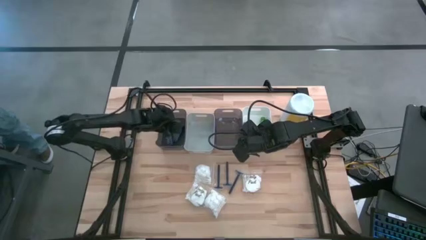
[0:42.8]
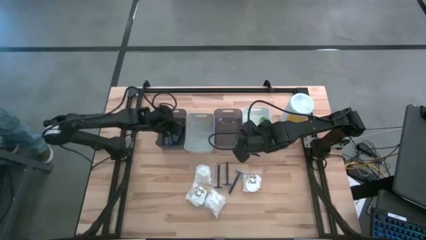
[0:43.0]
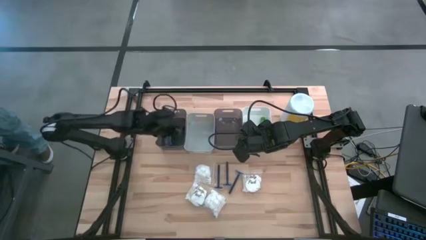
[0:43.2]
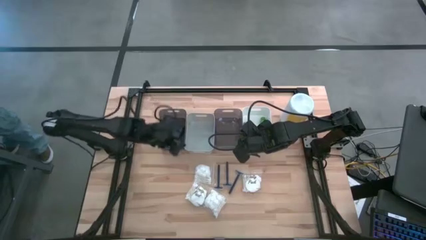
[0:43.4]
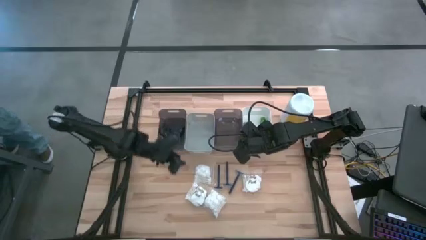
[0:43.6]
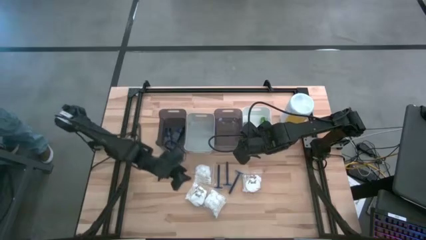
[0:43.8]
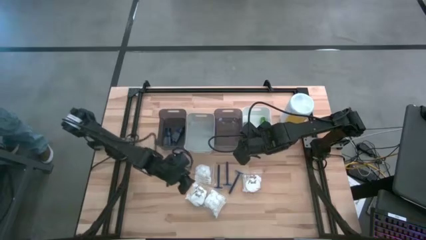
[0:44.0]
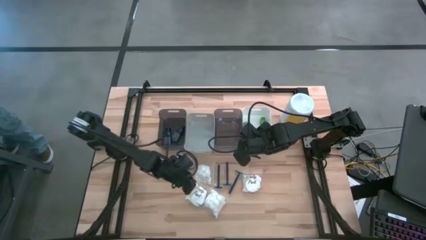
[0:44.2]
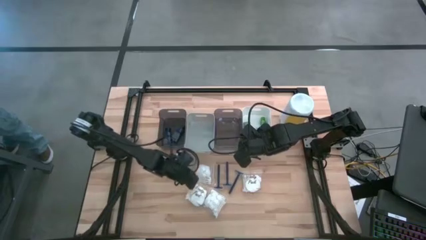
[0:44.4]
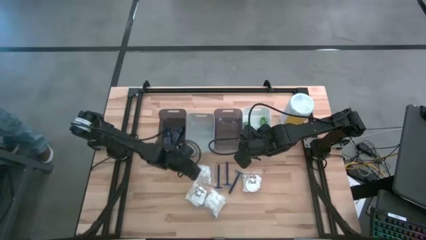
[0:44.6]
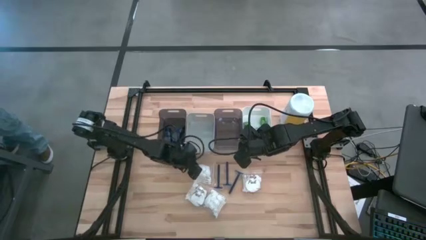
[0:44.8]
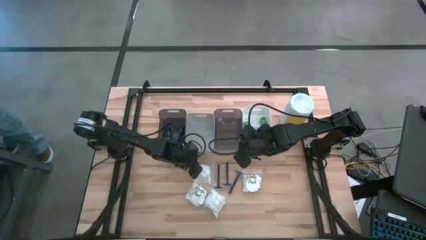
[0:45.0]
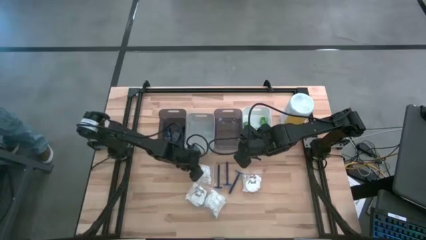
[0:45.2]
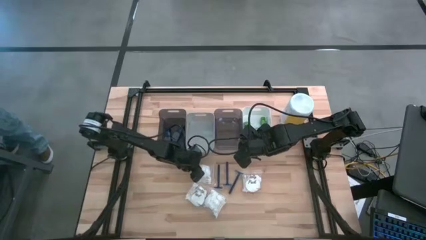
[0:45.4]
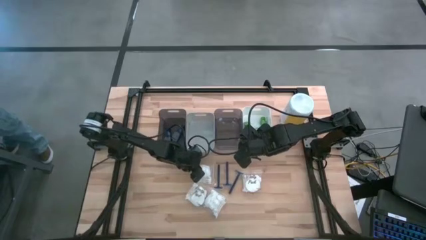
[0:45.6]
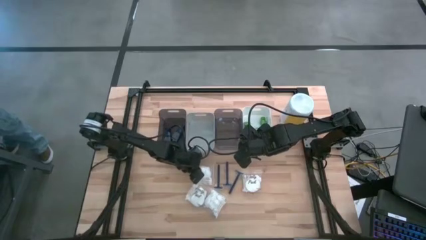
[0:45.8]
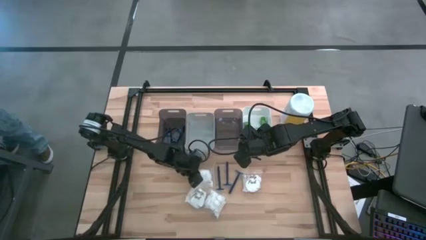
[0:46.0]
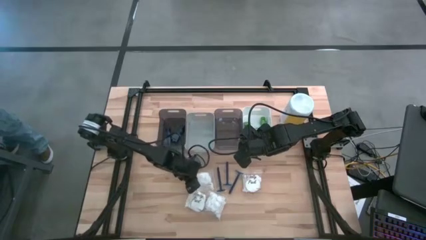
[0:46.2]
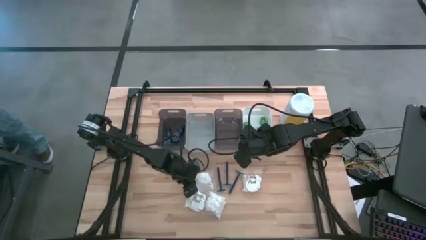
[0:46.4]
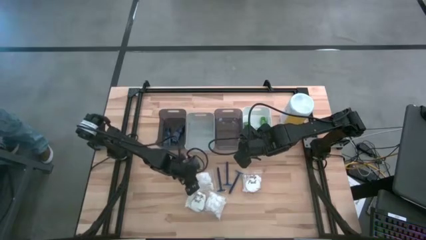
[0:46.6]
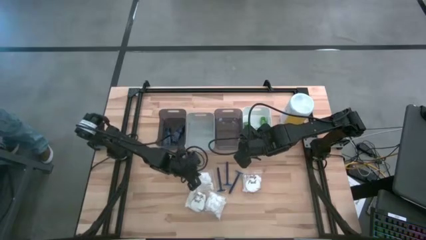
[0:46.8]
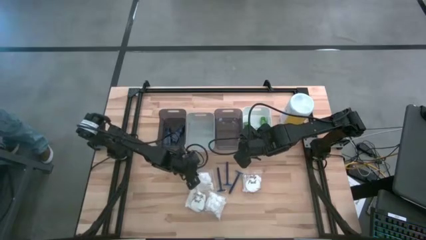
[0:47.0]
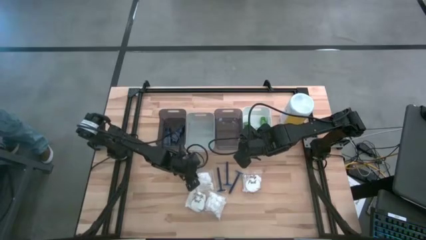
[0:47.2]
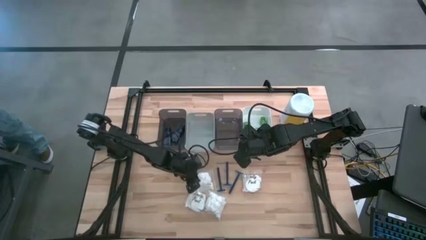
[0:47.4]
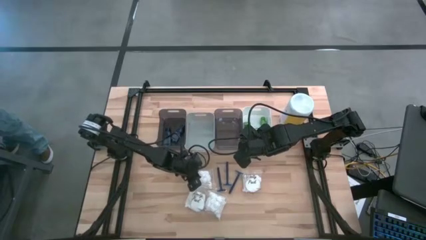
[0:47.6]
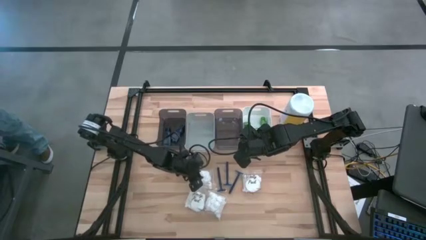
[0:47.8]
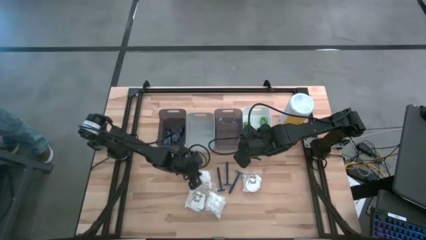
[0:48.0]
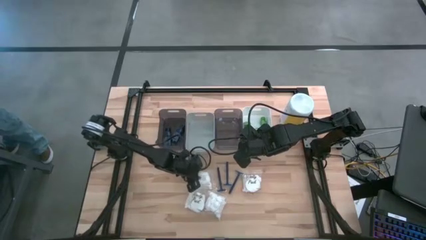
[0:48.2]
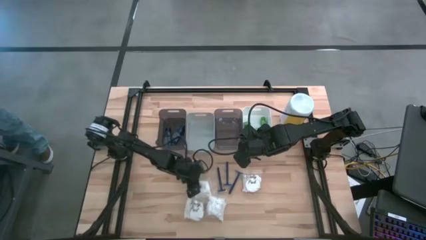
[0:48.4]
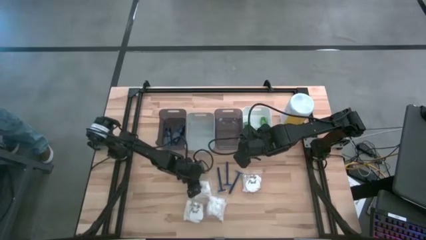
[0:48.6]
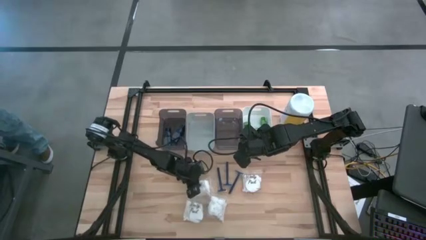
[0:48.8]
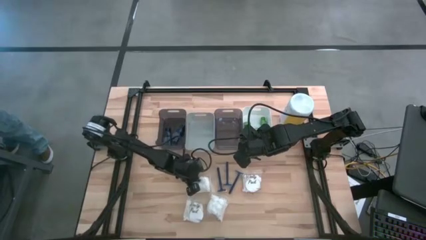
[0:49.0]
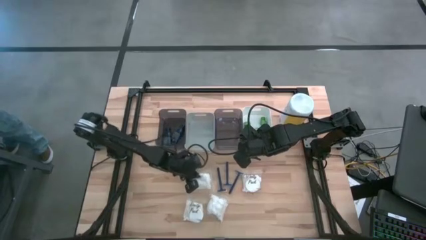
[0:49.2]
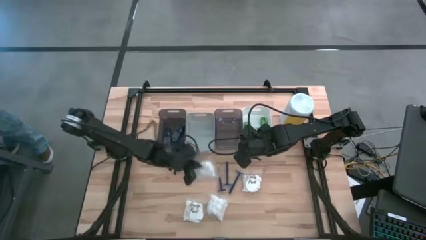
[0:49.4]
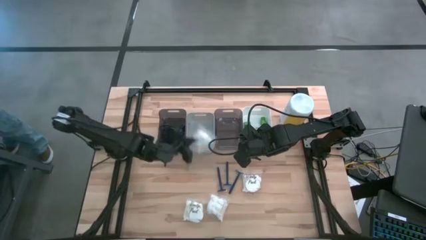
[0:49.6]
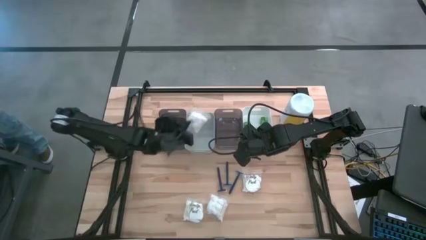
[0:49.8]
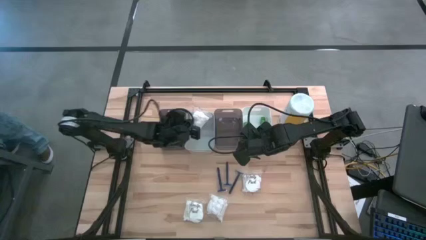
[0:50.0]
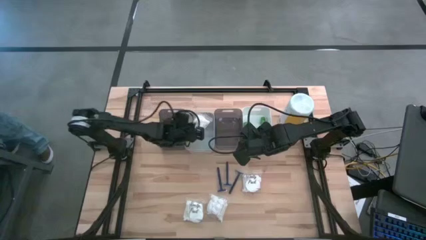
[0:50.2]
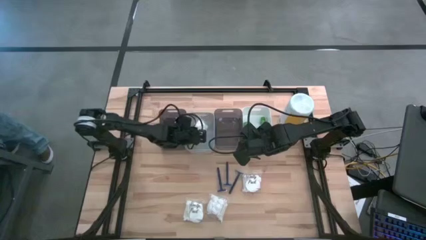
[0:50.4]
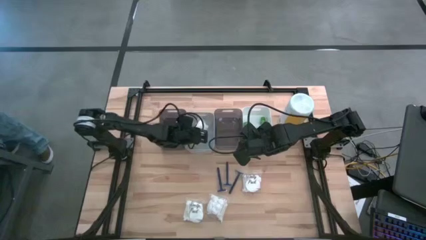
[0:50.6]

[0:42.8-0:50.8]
Task: Pick & Place Travel size toiletries
Put the white cotton pack into the gray bin

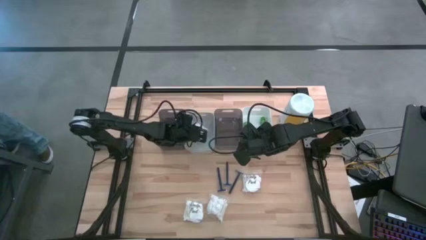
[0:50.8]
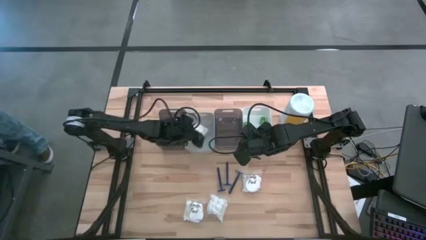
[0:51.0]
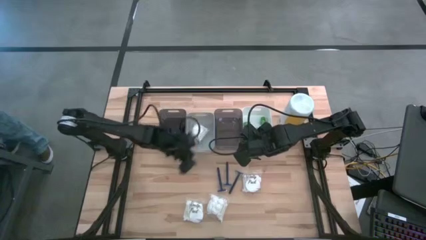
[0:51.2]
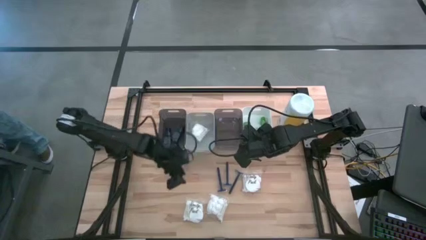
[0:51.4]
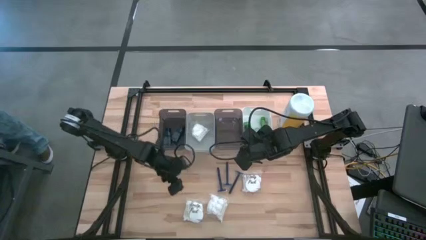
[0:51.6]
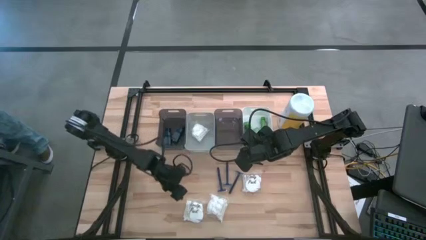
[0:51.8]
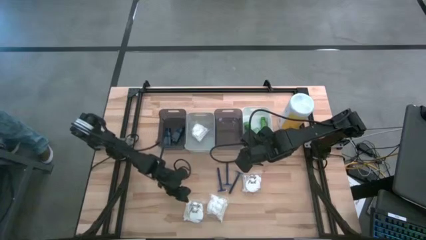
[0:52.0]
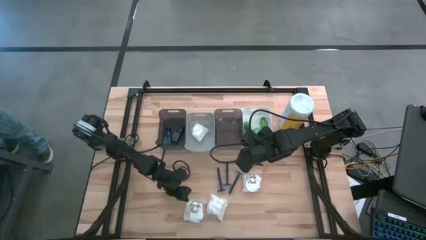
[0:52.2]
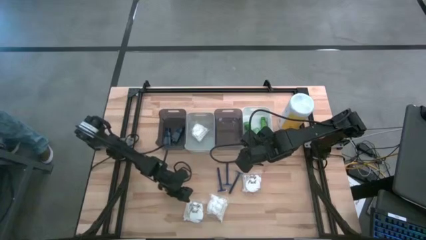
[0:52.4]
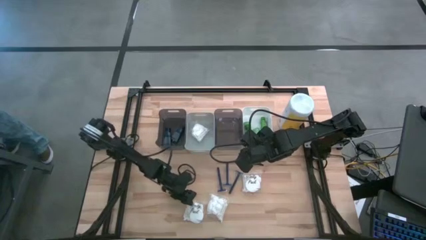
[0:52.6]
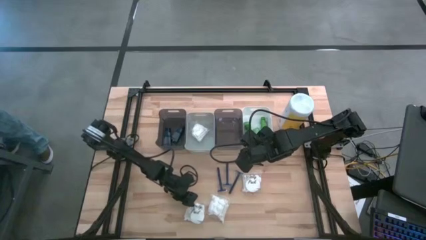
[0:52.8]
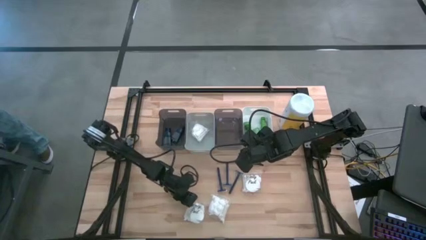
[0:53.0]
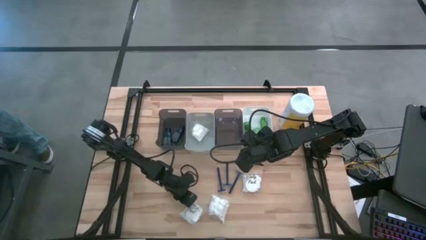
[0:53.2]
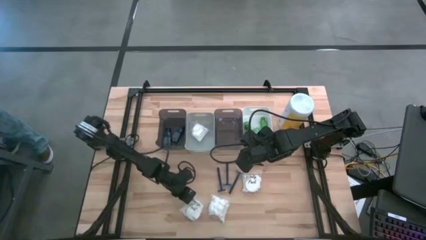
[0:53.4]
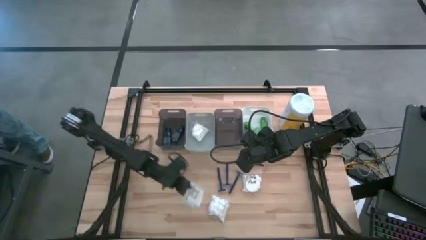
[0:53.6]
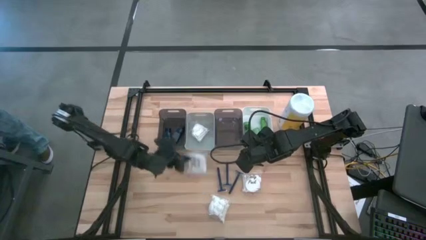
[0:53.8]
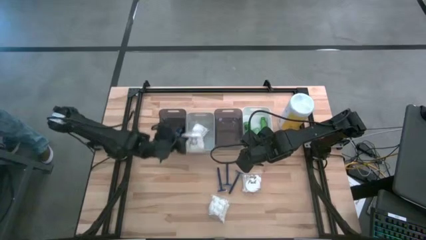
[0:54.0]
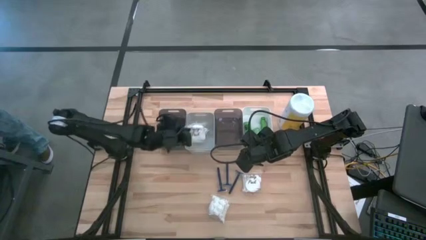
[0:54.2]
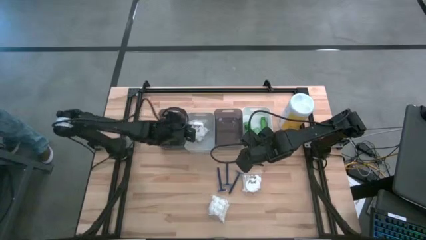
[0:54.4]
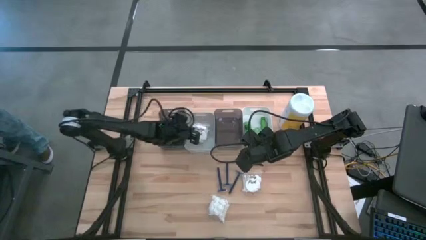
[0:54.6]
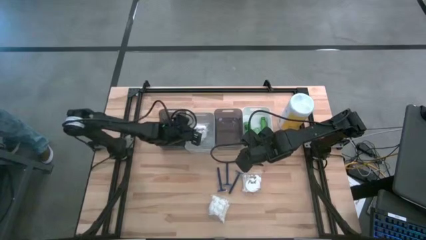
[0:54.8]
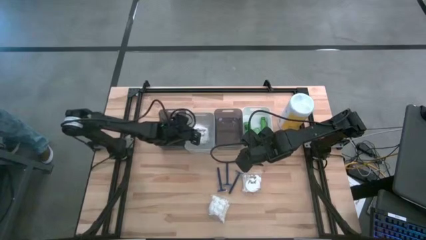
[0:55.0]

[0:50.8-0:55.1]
Put the white cotton pack into the gray bin

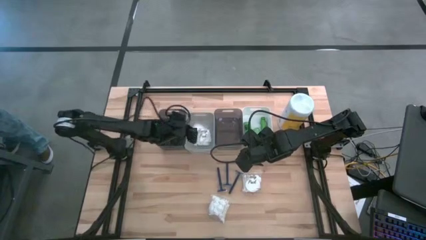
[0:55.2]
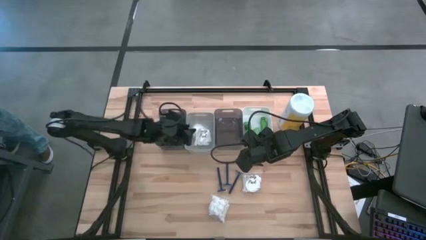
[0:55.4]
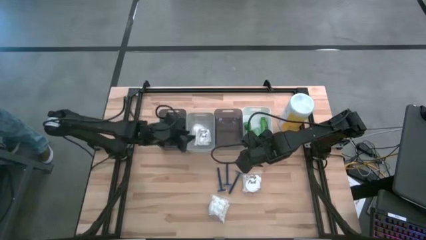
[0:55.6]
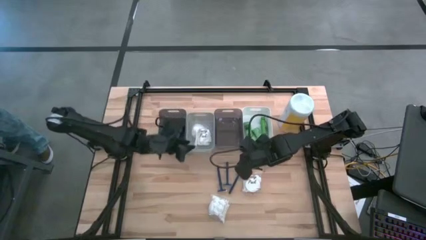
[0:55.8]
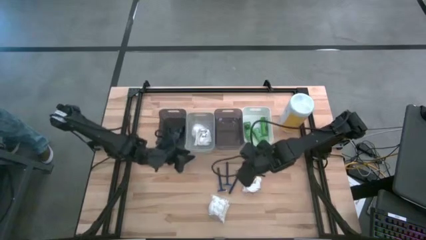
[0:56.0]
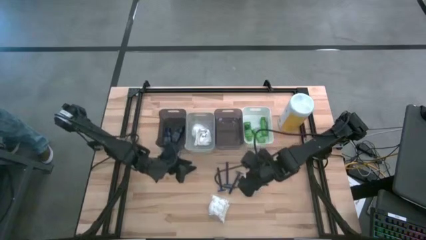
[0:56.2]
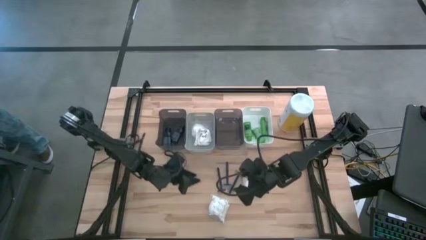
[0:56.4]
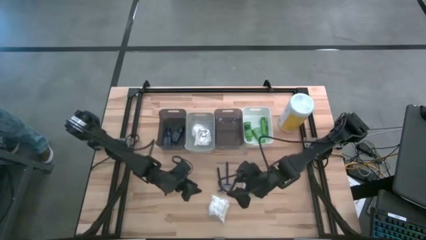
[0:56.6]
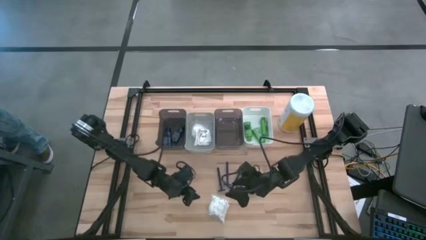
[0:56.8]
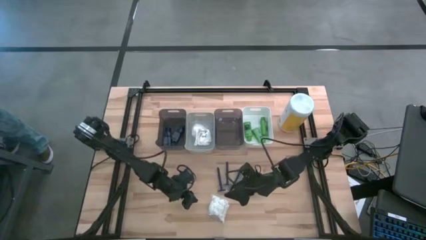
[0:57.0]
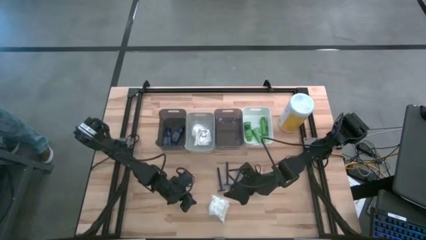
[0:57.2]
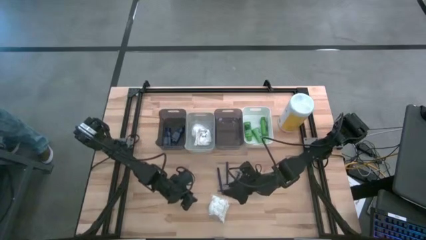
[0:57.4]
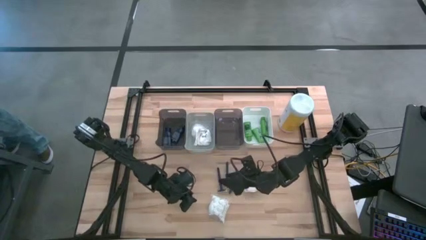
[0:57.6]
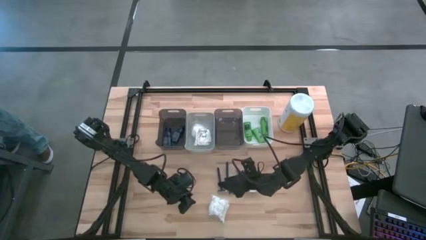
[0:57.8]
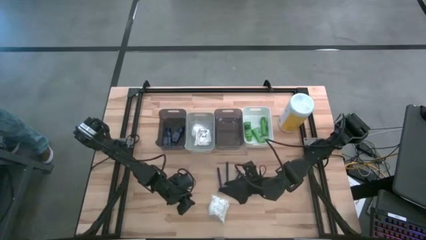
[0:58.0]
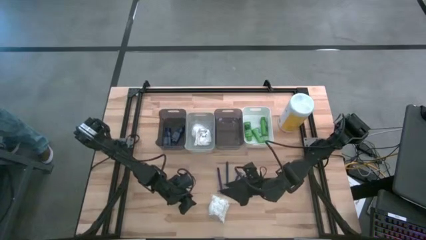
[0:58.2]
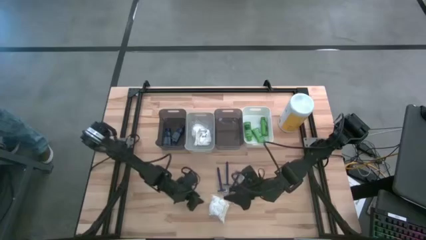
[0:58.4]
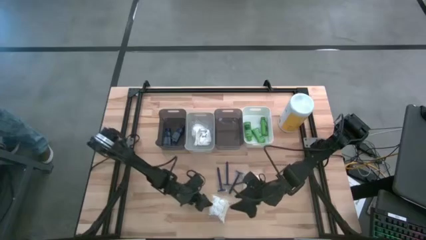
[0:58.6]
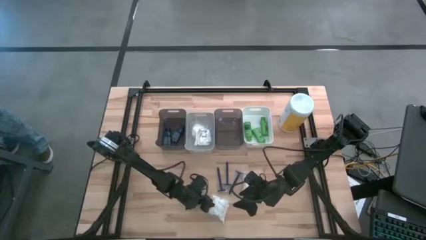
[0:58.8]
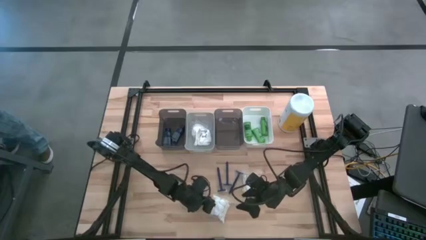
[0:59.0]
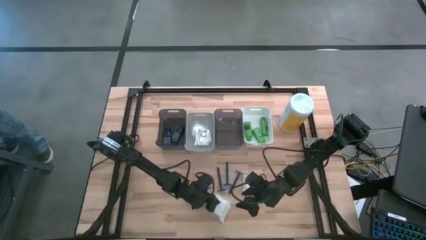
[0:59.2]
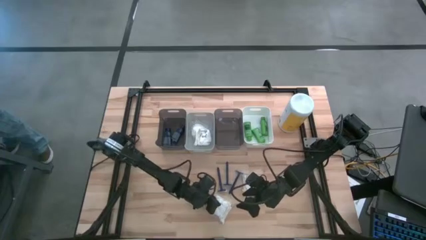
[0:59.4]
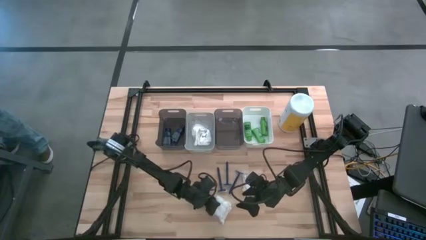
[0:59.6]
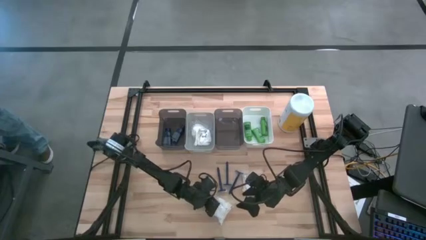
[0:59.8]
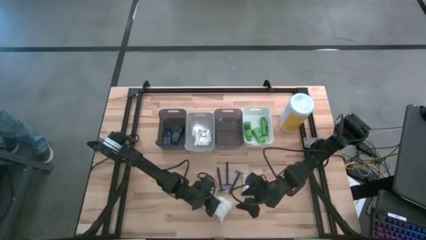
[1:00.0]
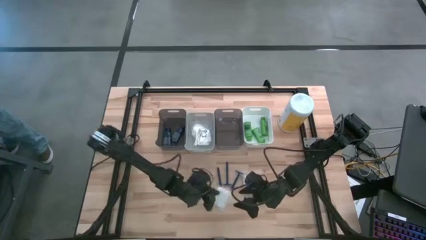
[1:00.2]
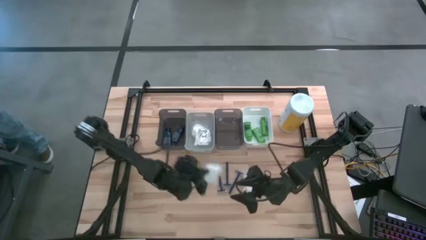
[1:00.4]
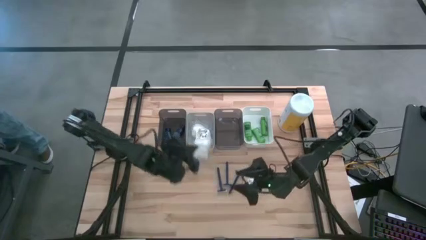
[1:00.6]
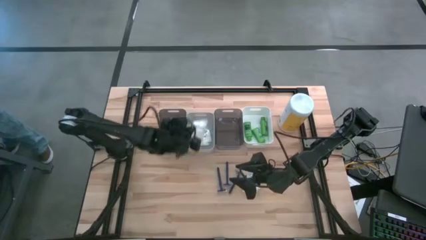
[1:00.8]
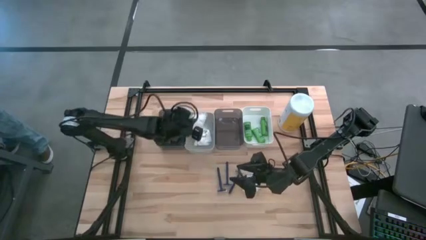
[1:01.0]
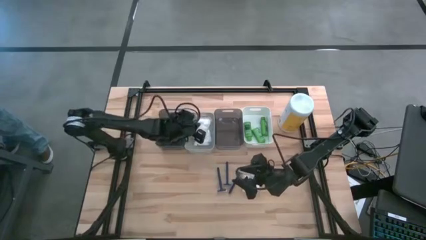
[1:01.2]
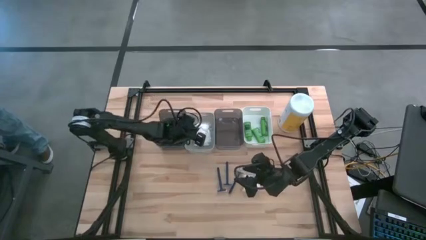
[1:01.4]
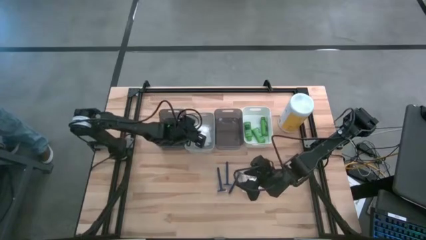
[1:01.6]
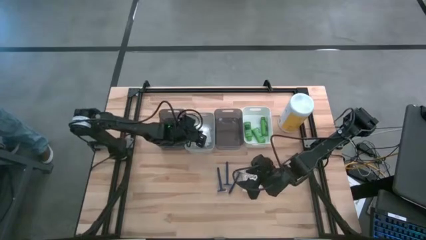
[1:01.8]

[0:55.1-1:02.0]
Put the white cotton pack into the gray bin
